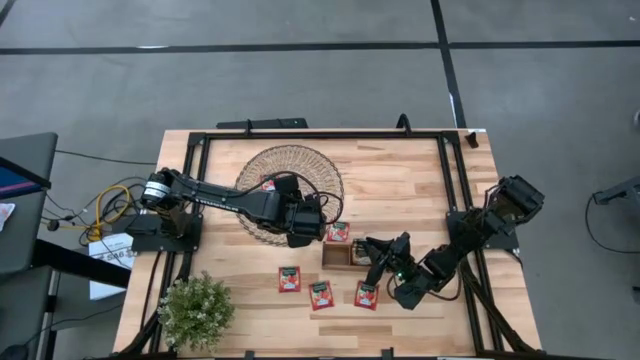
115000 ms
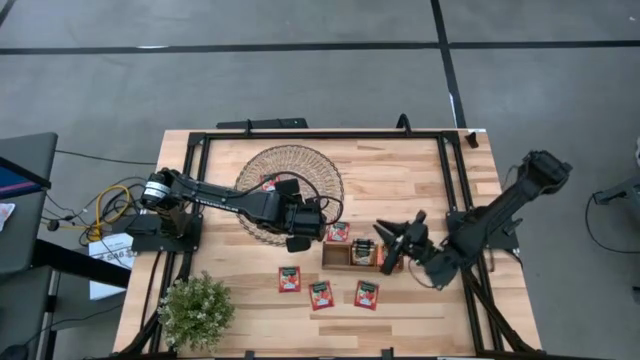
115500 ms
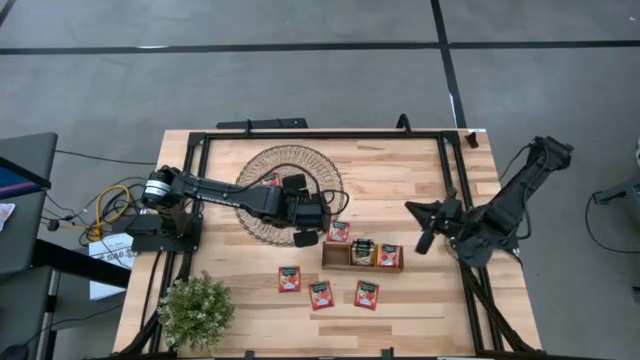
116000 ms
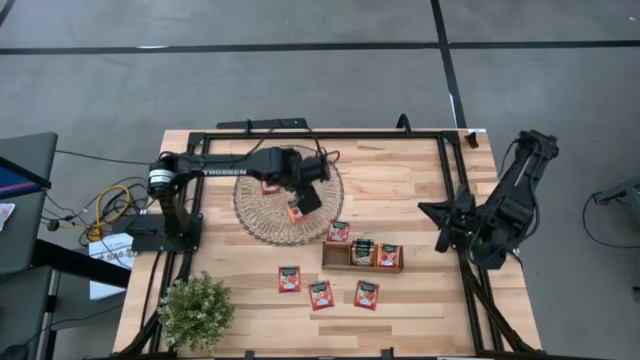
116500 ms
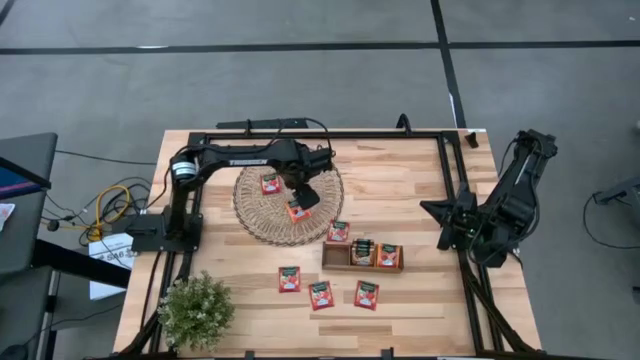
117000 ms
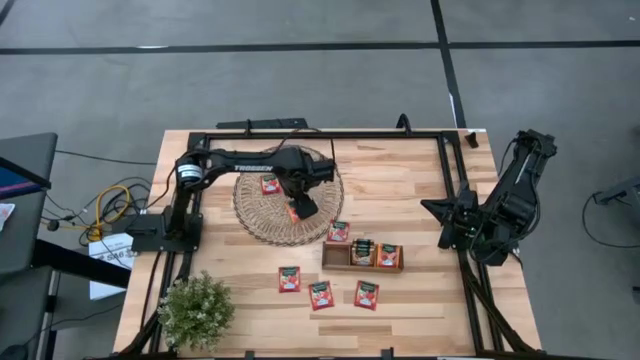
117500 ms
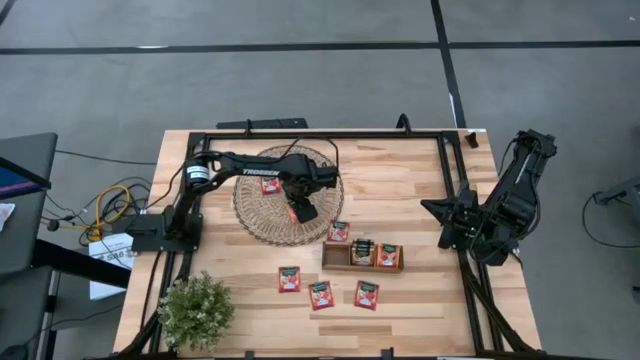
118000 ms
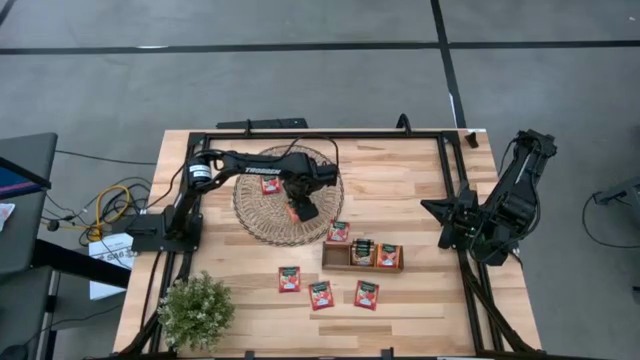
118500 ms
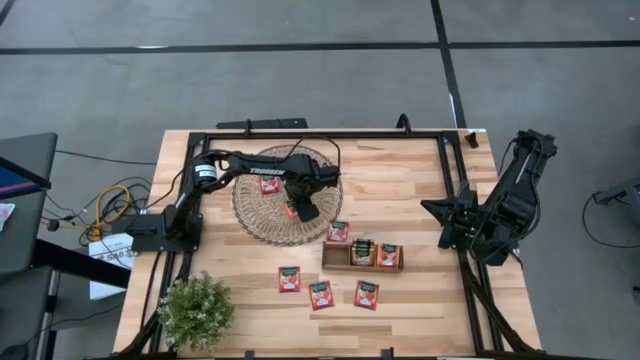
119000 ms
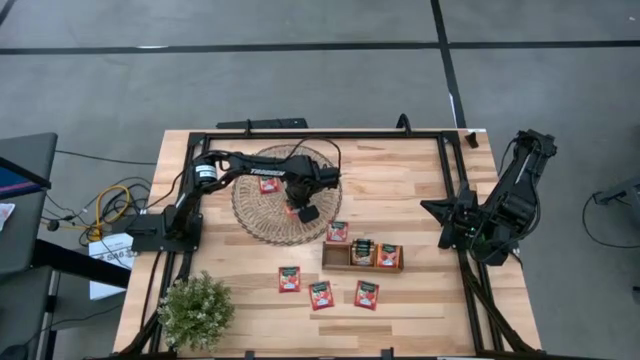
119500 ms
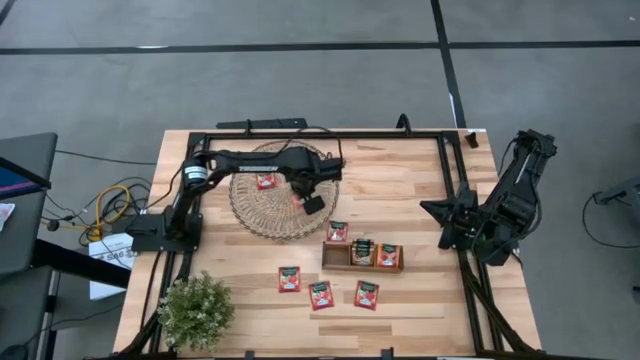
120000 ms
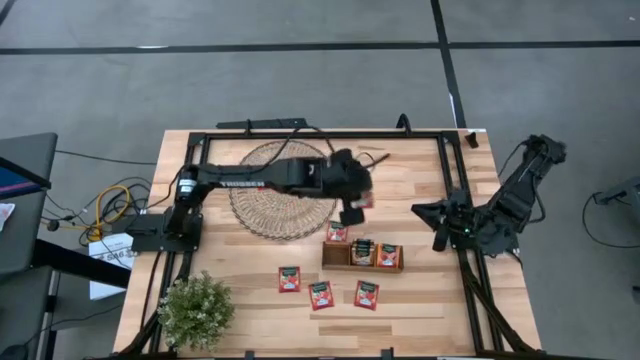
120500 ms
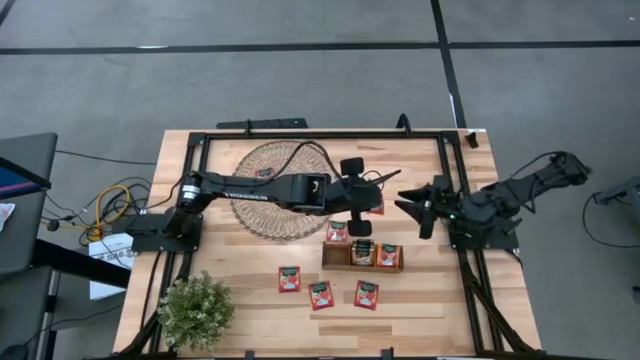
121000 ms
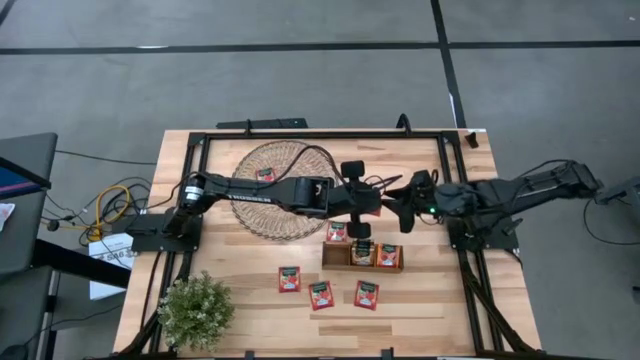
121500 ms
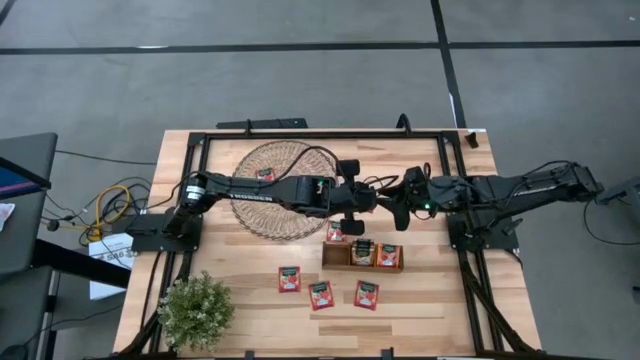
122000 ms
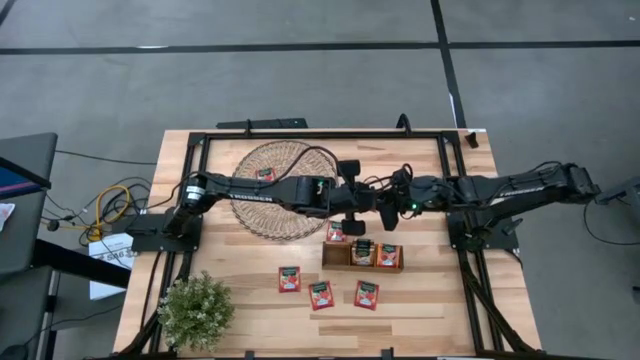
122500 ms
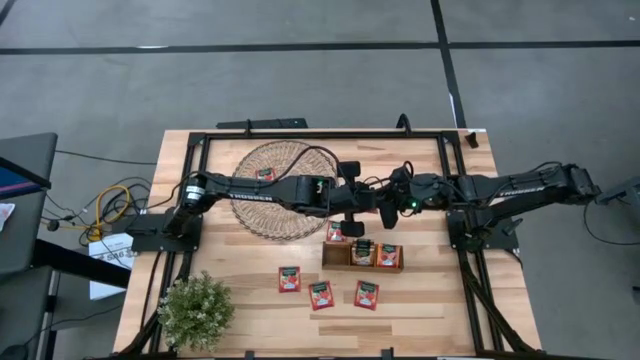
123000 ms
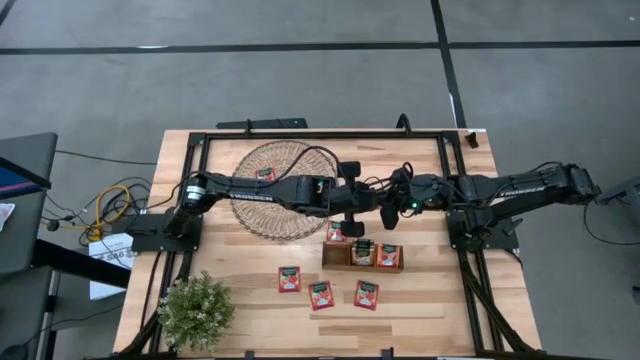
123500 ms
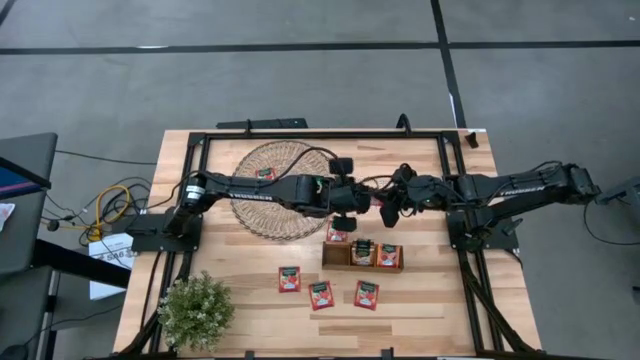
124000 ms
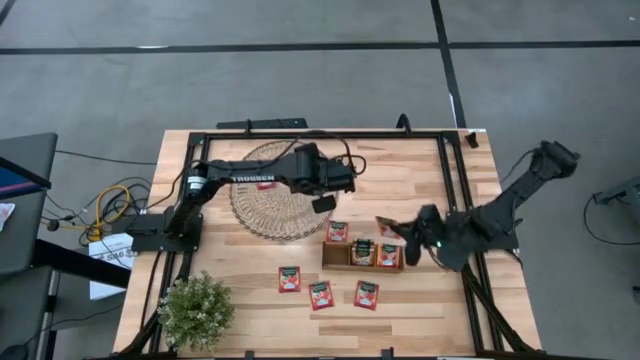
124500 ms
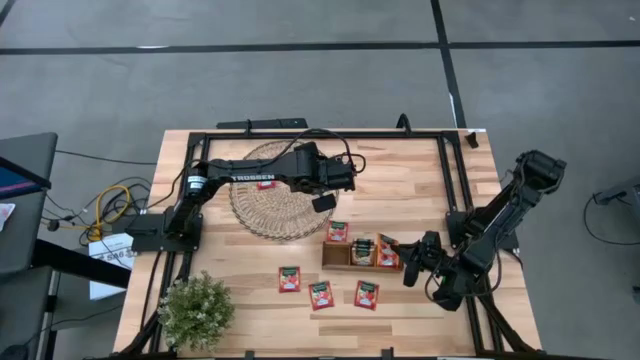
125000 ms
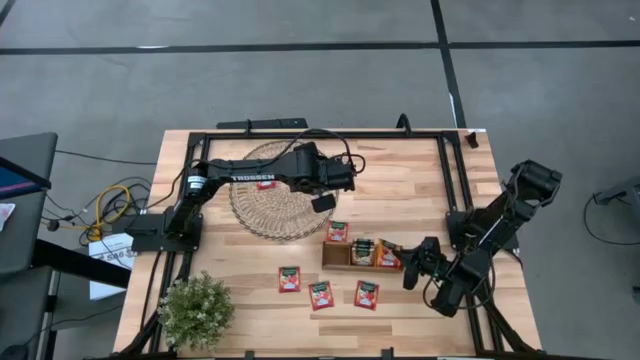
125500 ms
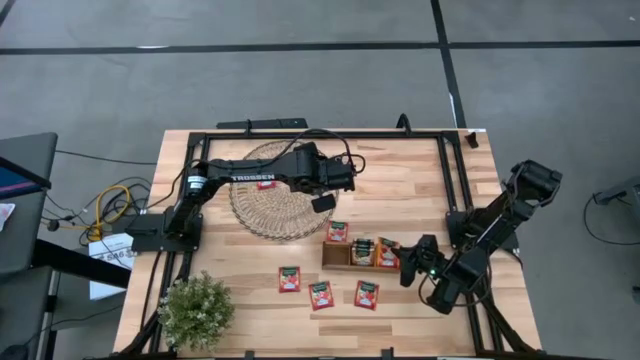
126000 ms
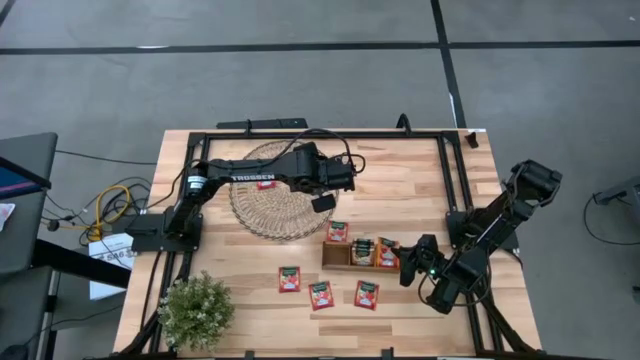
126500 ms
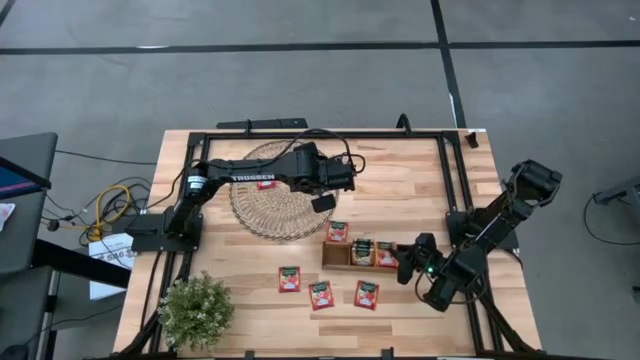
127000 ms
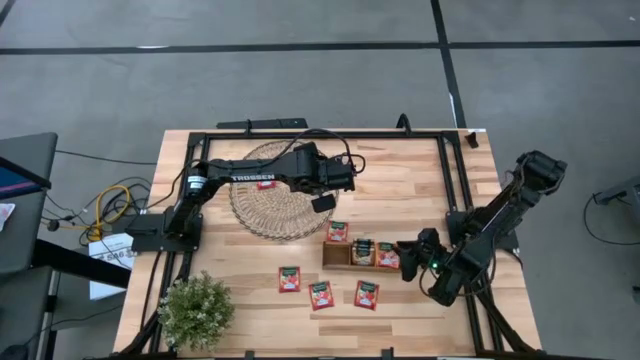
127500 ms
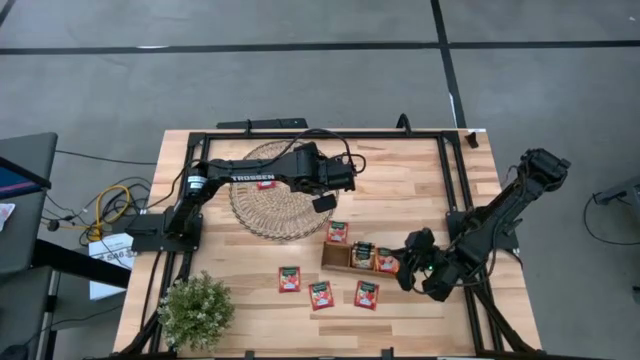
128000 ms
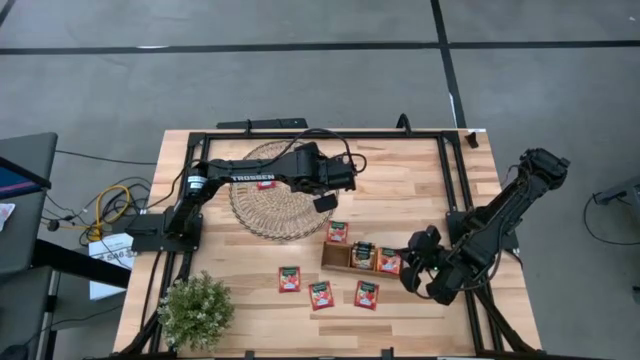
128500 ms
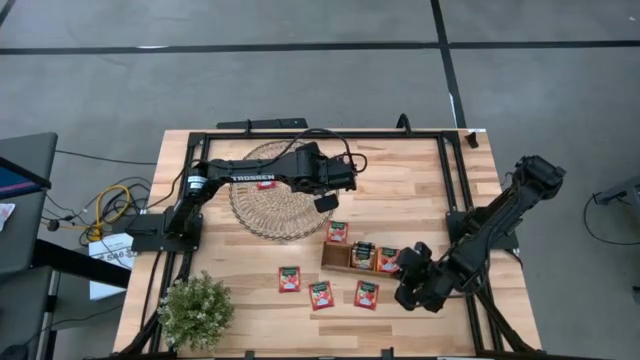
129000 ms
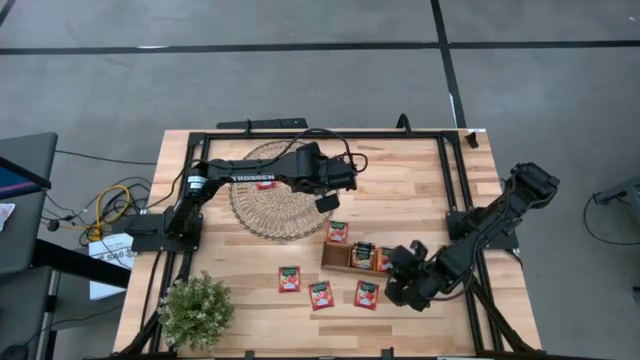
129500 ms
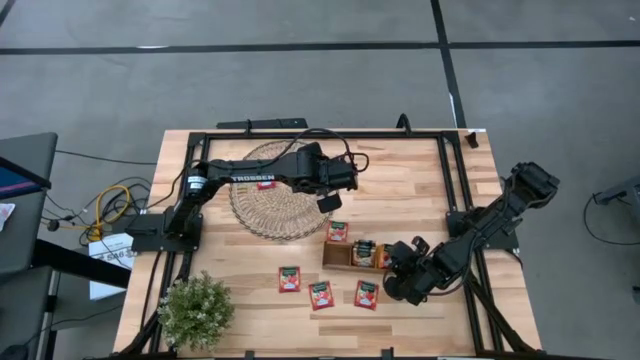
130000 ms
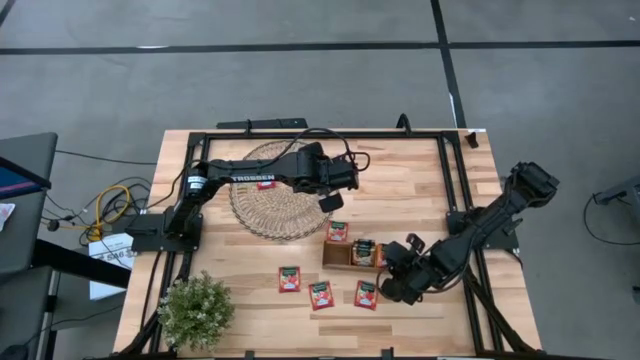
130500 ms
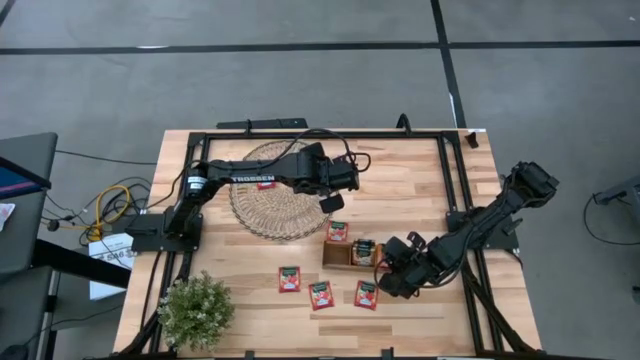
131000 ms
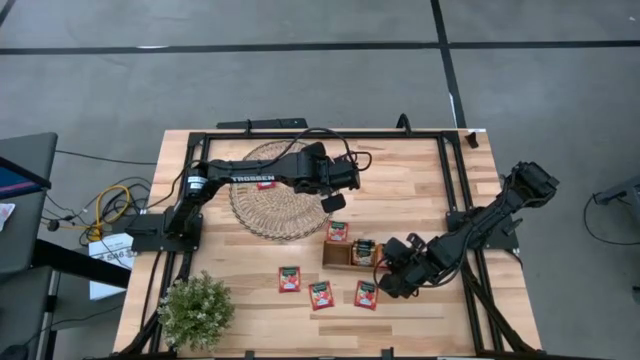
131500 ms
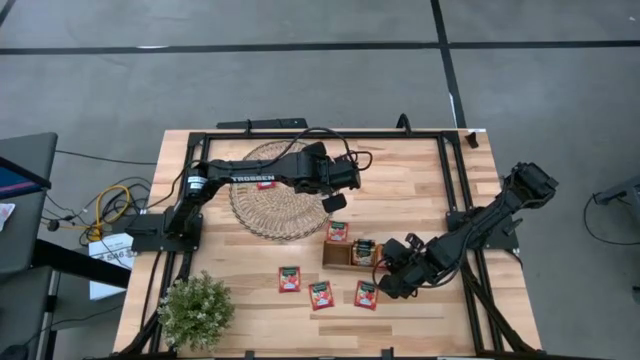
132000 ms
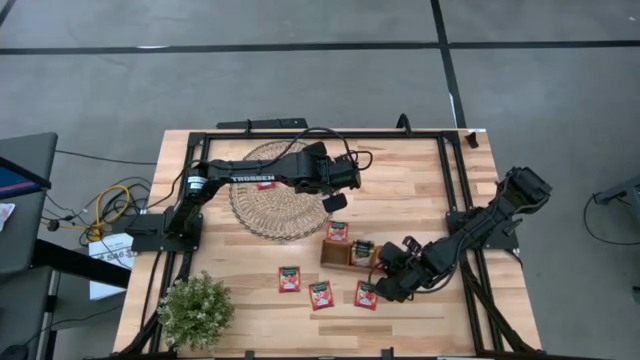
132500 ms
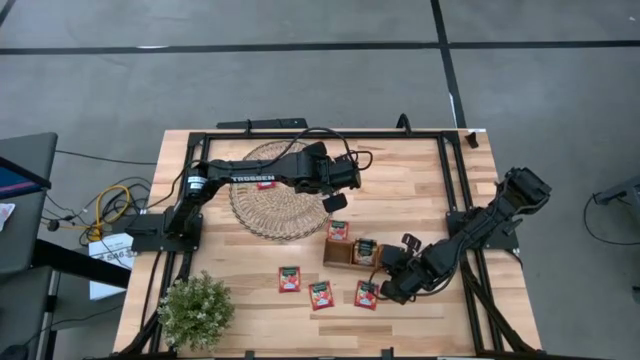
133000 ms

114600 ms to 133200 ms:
Task: Pick & Place Tea
Put the orange tea bag into the right section of the wooden organizer
